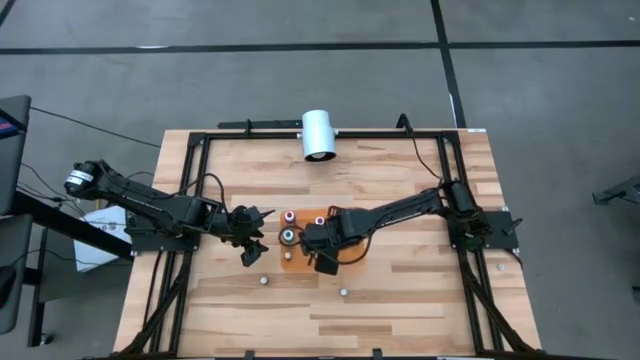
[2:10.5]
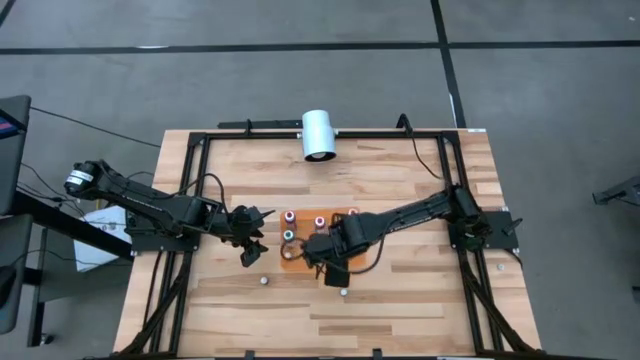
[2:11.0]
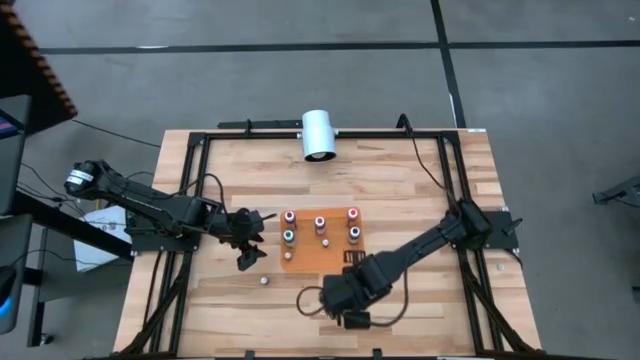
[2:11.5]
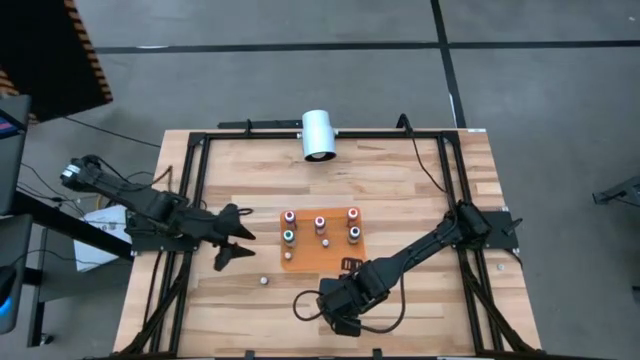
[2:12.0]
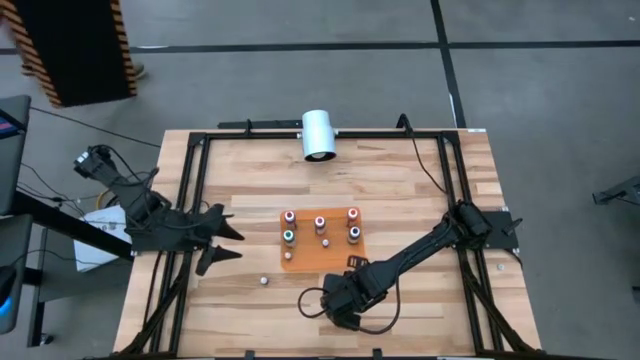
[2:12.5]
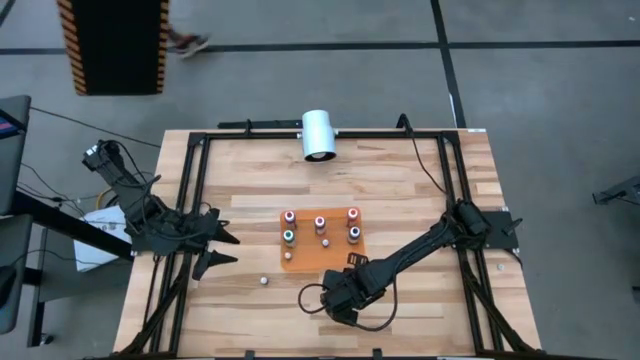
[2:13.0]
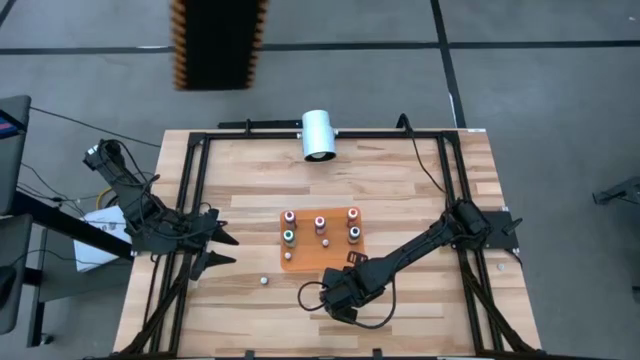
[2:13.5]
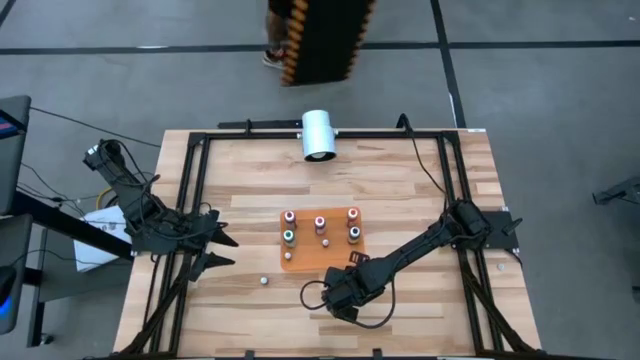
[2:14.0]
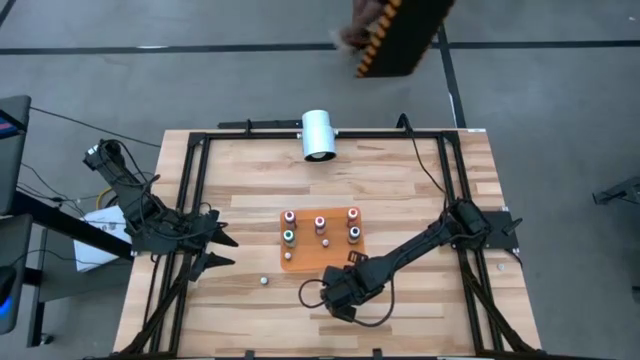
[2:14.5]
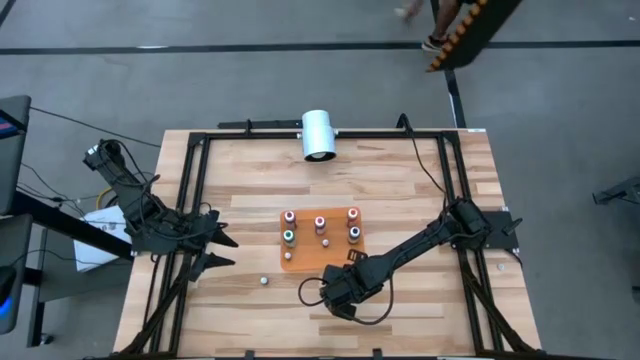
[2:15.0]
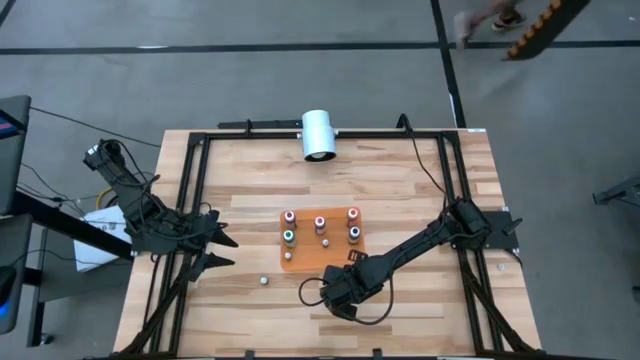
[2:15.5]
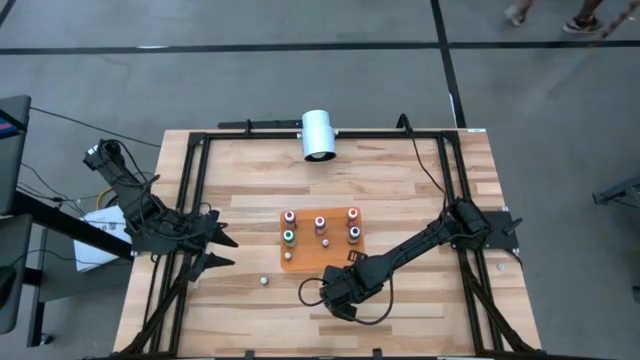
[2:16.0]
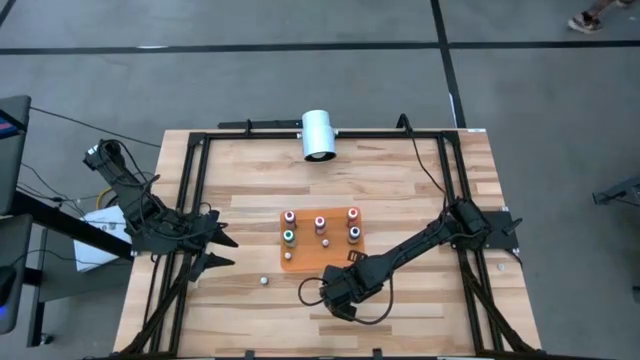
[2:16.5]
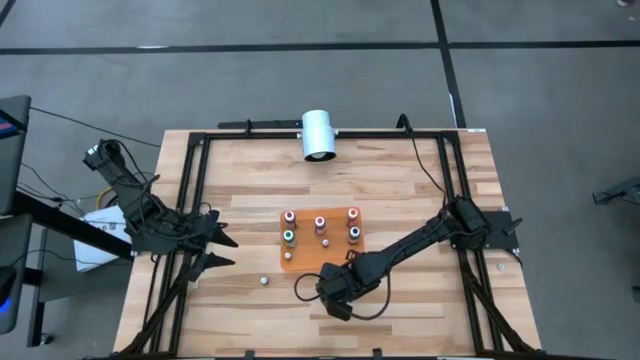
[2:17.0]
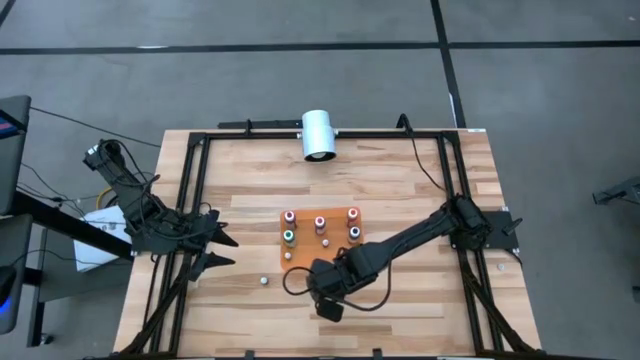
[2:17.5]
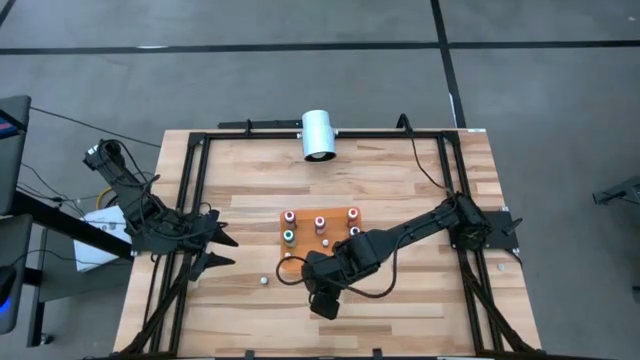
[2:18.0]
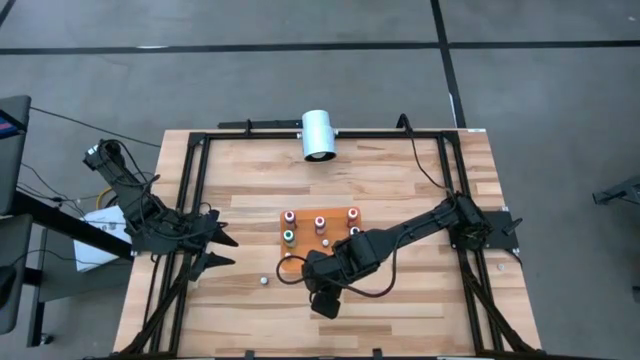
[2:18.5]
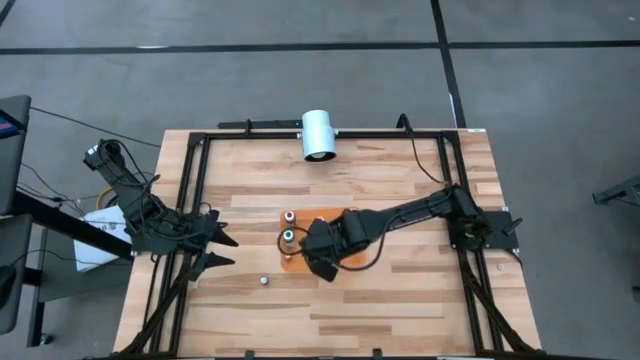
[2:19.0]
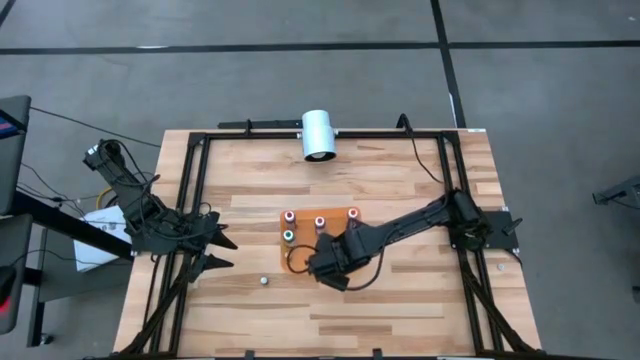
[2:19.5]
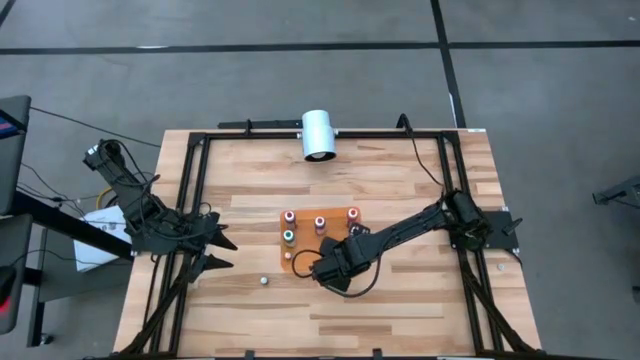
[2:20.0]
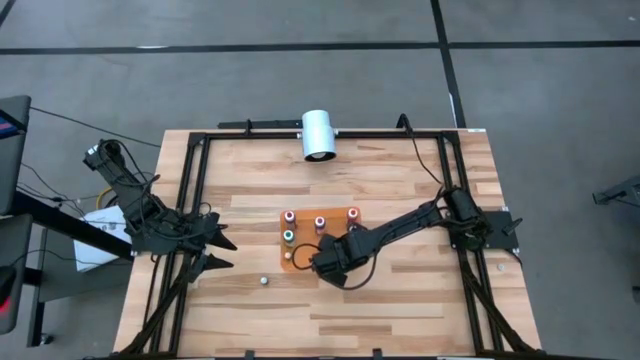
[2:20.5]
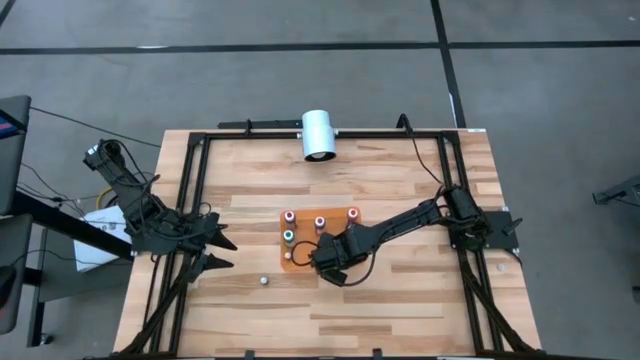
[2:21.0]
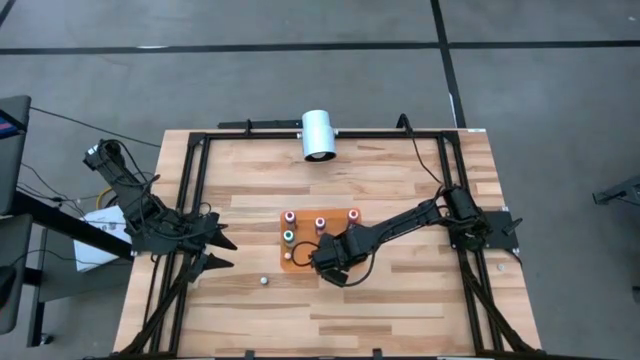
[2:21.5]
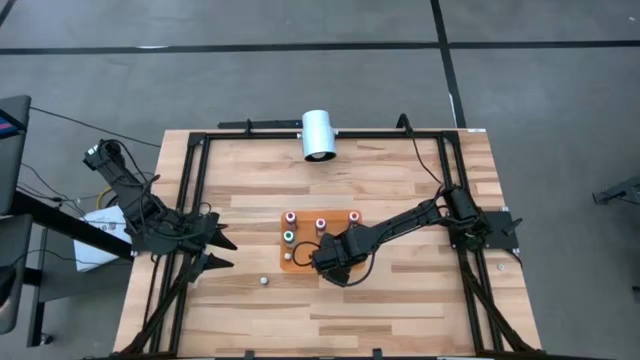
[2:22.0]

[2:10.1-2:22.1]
Task: Pick & Place food coloring
Put the small purple food coloring bottle into the orange container

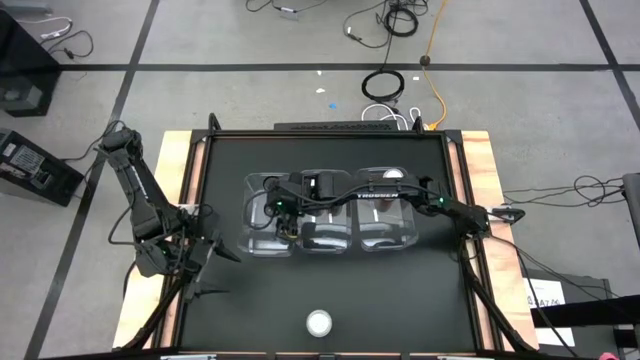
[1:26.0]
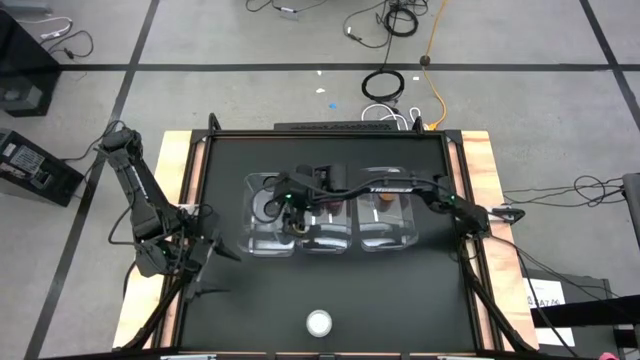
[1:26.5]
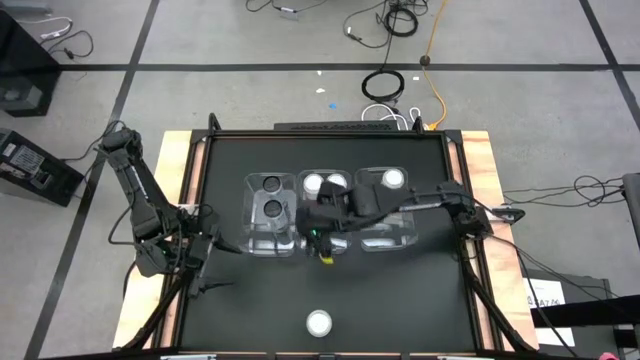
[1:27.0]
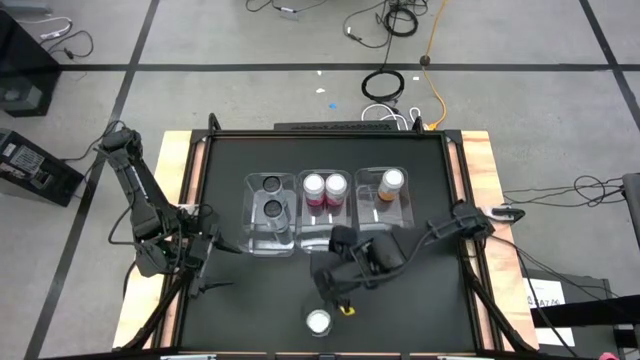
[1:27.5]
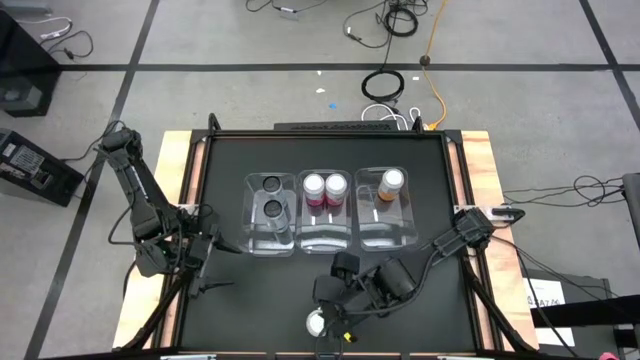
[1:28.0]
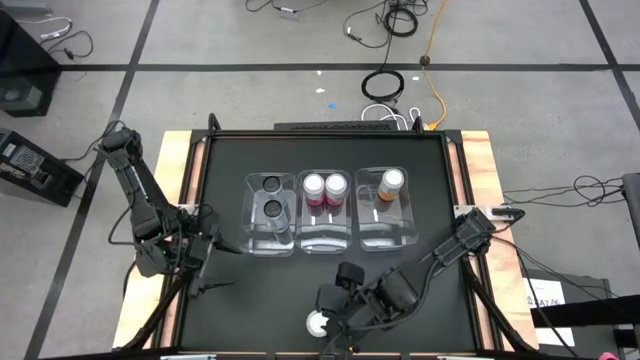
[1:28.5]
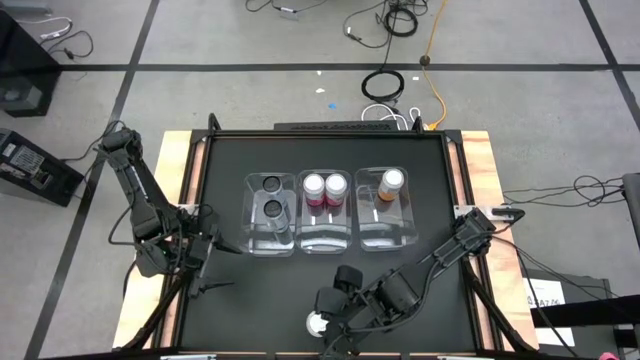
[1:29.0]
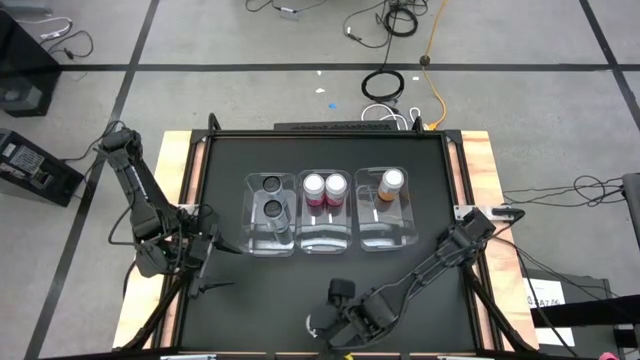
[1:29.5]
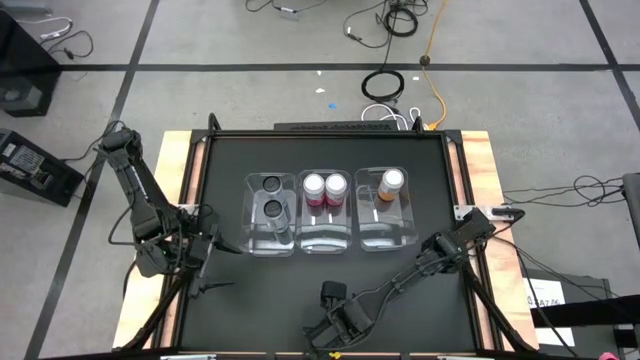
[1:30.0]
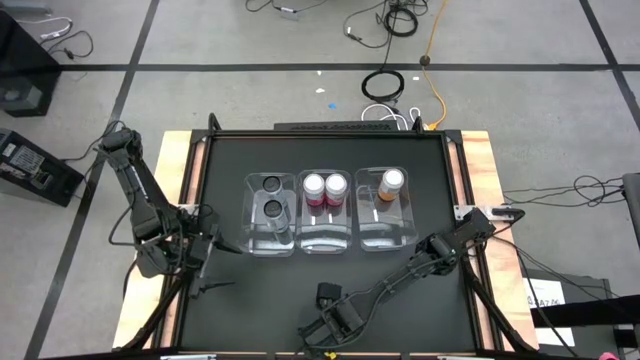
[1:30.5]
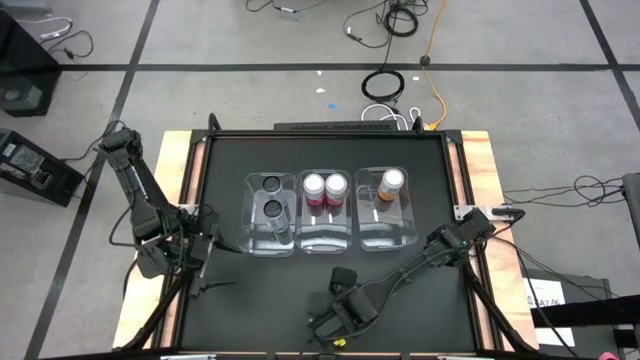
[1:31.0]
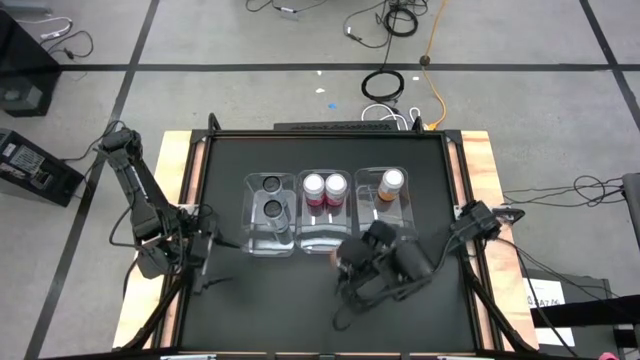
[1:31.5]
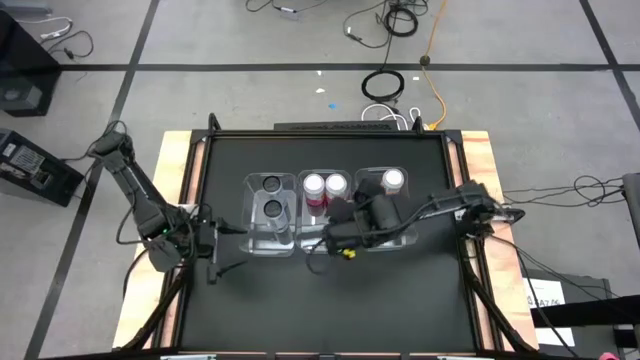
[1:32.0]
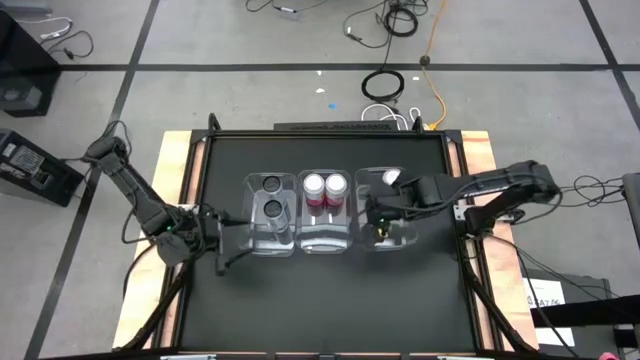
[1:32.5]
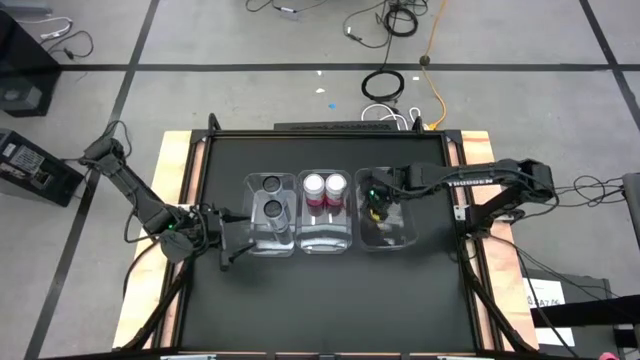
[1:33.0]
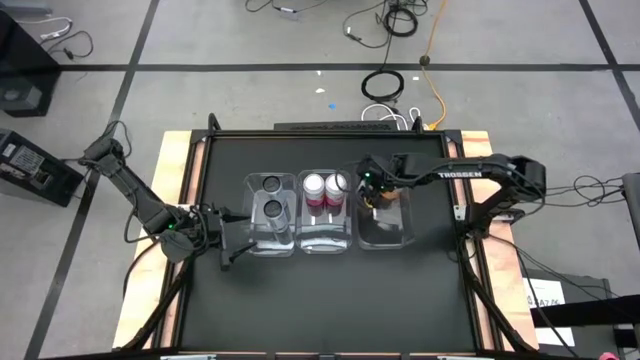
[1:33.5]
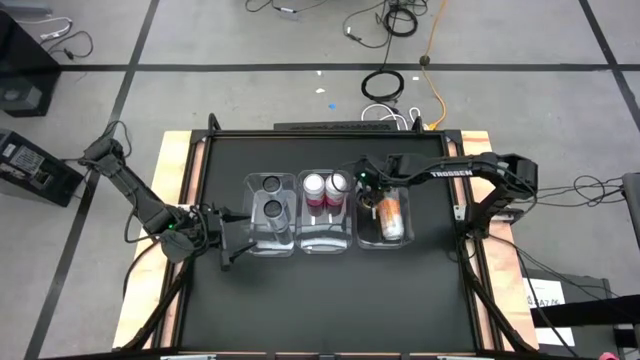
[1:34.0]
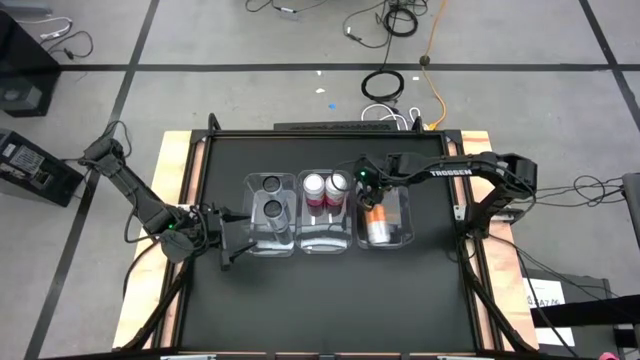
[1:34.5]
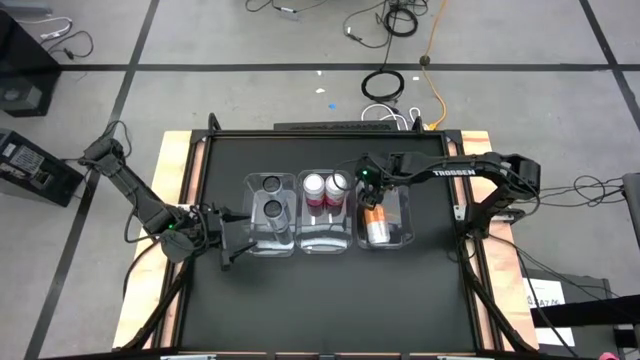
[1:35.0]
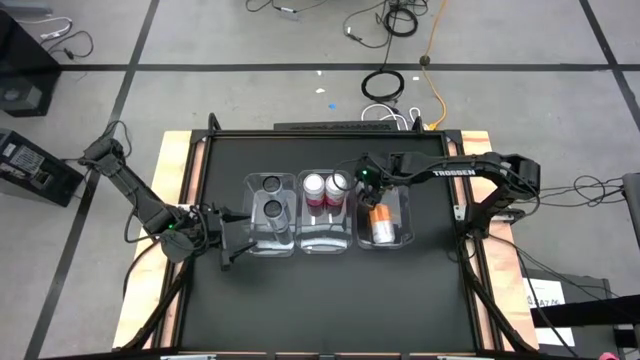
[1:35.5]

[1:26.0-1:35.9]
Task: Sort soda cans
Put the orange soda can into the right transparent bin
